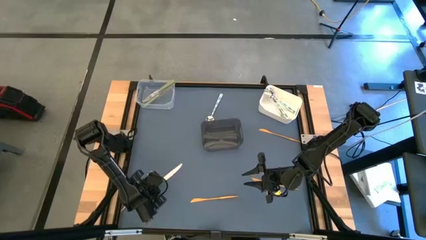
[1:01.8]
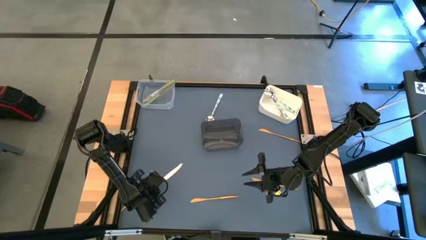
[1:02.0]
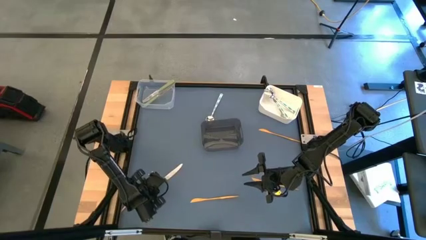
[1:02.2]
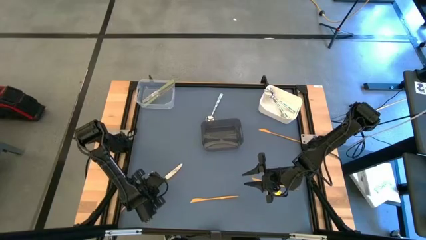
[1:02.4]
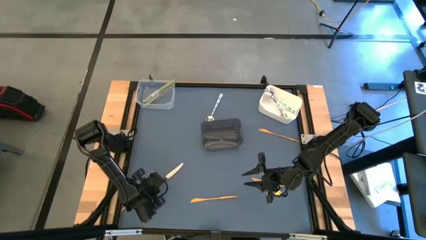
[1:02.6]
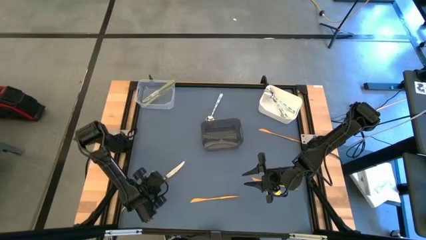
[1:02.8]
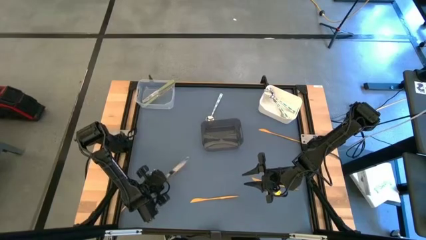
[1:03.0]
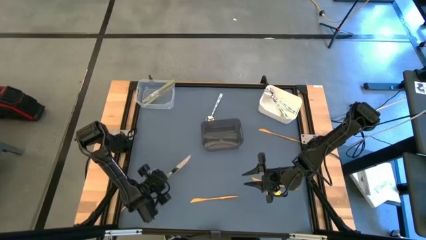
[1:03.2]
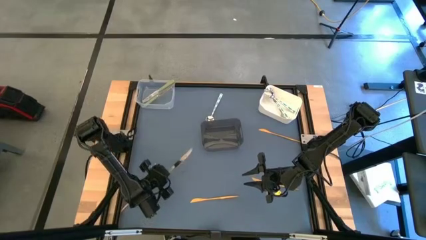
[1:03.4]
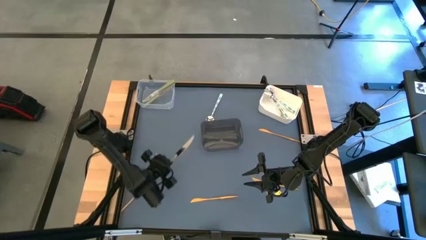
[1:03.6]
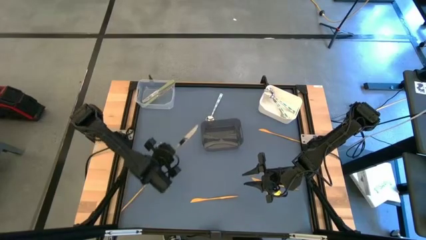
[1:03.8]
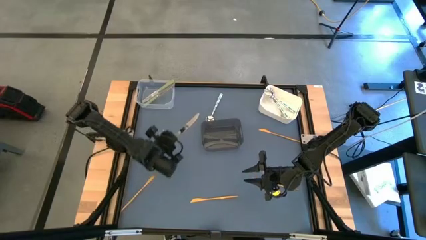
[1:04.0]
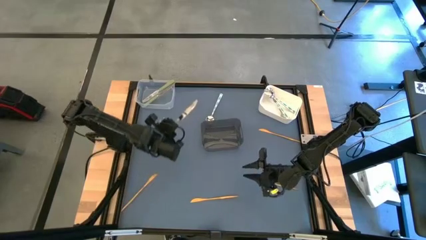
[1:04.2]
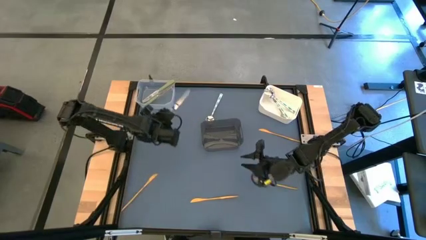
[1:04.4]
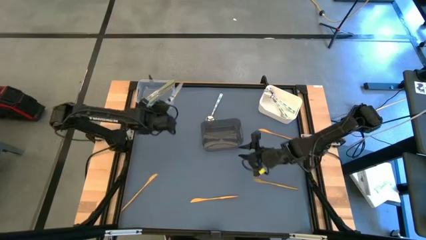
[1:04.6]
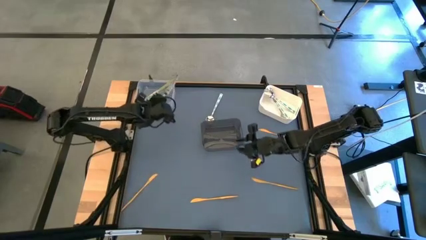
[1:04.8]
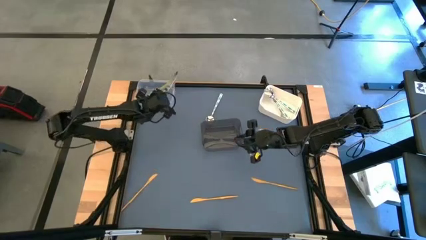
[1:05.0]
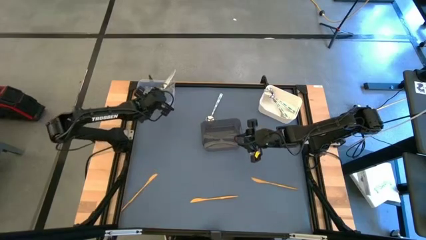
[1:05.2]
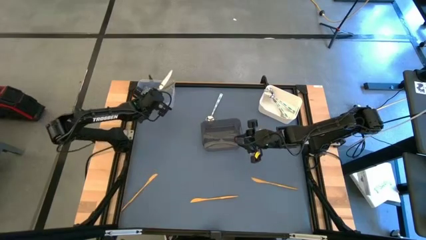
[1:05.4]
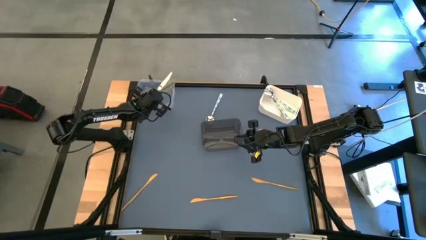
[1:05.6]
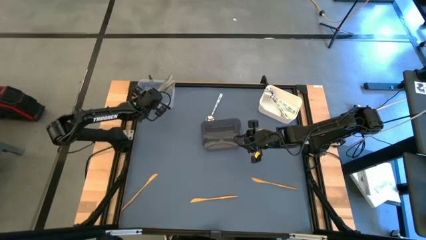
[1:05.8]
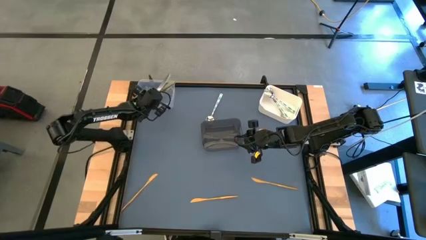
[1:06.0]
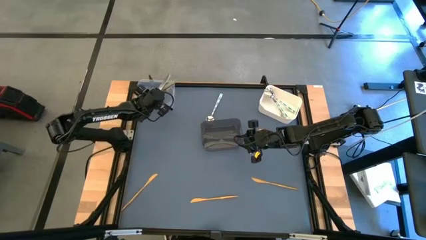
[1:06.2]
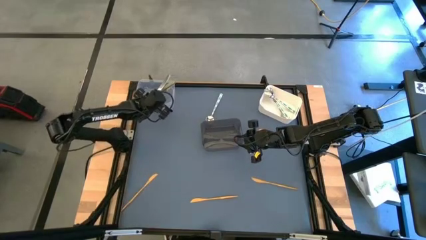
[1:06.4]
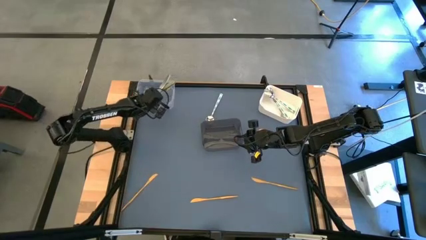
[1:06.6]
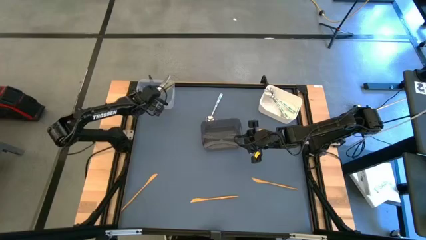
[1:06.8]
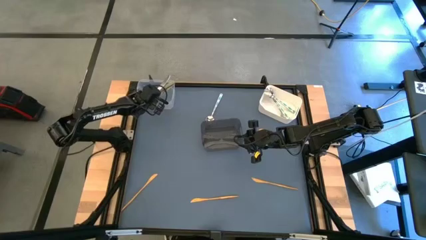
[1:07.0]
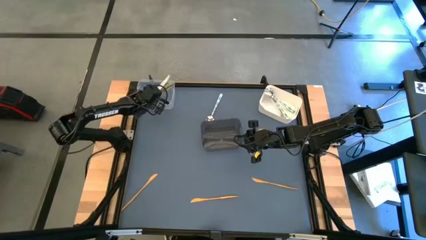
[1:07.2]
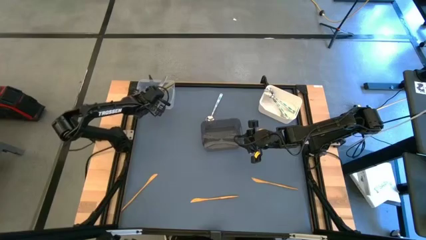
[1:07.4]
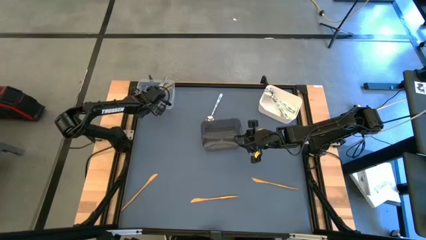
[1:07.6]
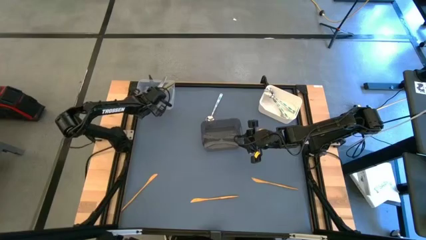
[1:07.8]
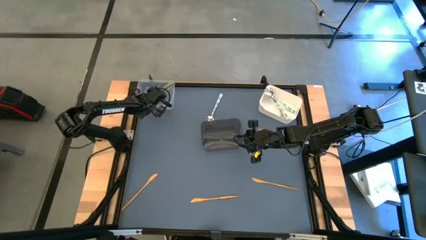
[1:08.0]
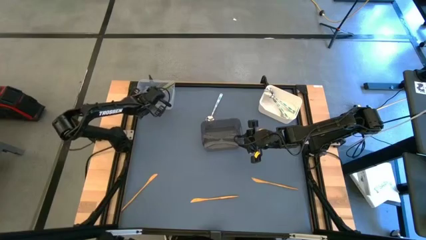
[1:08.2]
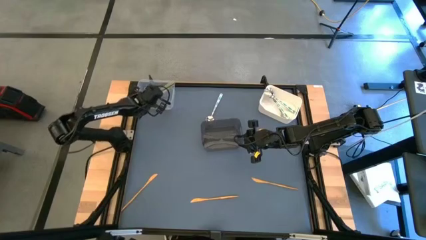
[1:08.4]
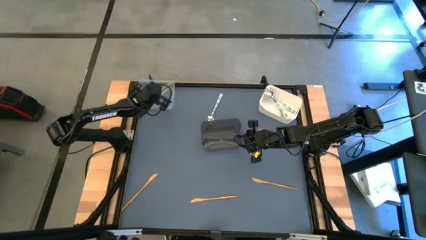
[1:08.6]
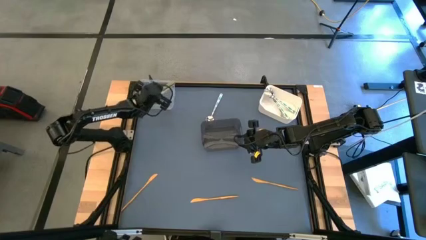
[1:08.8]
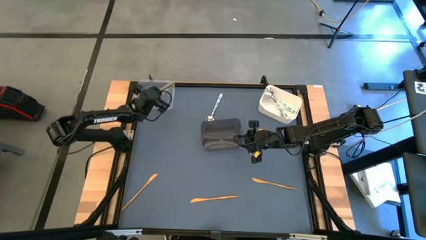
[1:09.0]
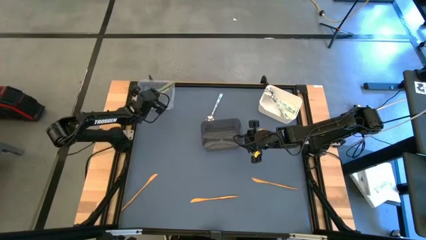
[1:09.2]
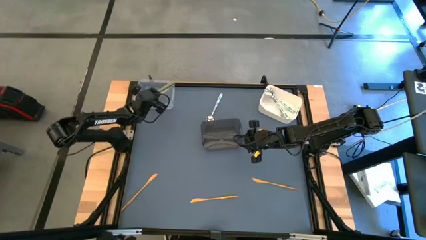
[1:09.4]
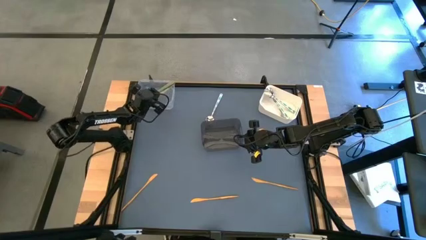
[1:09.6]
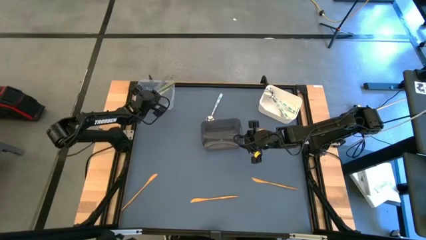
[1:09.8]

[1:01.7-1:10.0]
Task: Sort silverware by color (type)
Put the green knife into the transparent bin

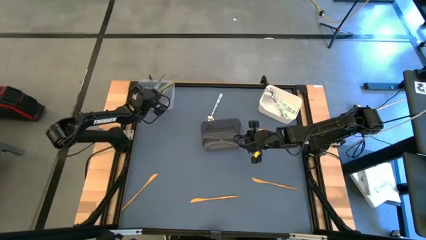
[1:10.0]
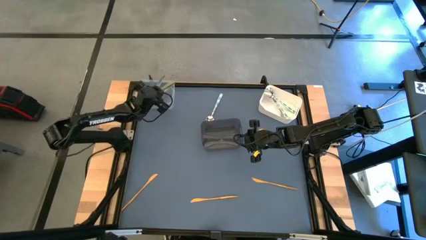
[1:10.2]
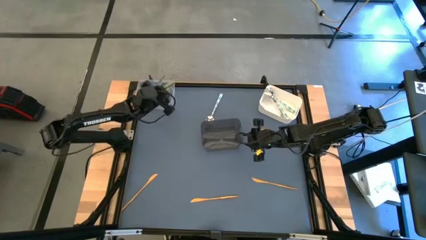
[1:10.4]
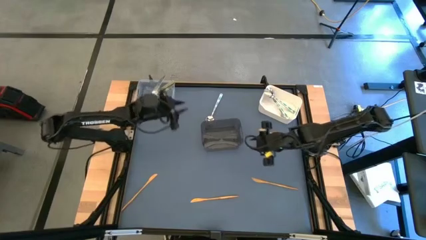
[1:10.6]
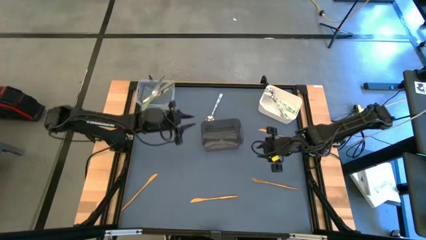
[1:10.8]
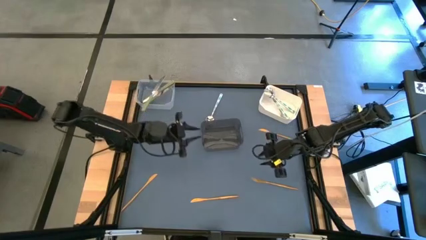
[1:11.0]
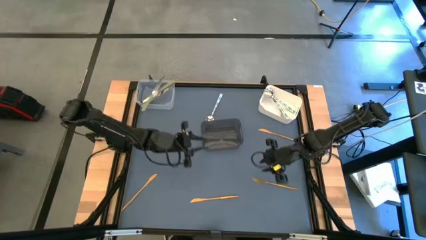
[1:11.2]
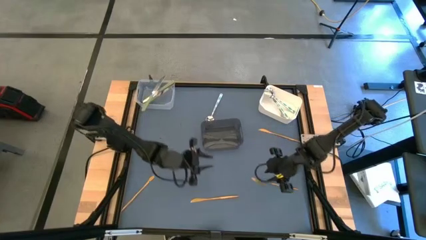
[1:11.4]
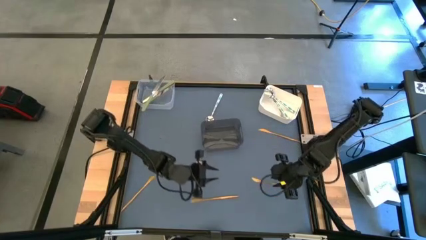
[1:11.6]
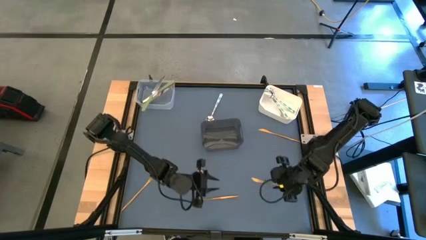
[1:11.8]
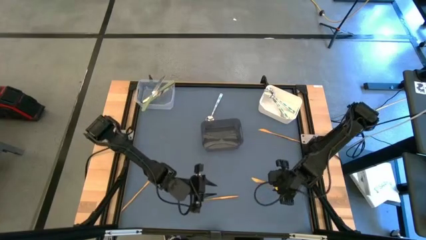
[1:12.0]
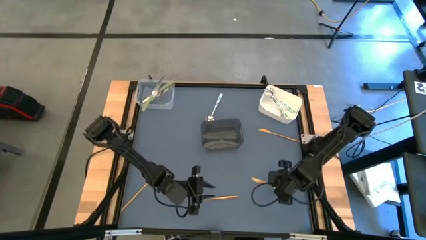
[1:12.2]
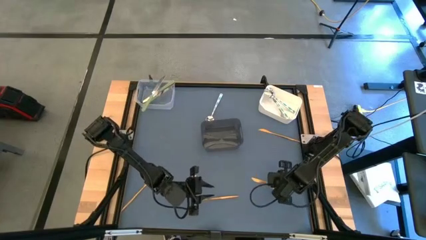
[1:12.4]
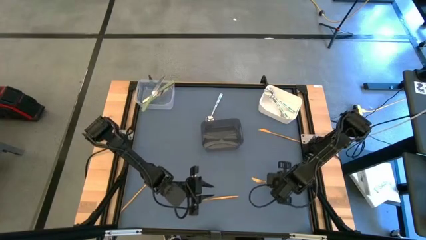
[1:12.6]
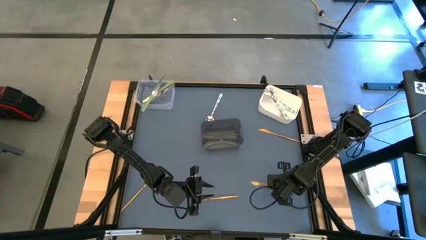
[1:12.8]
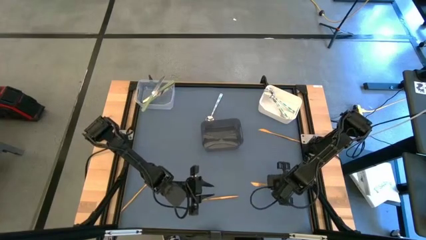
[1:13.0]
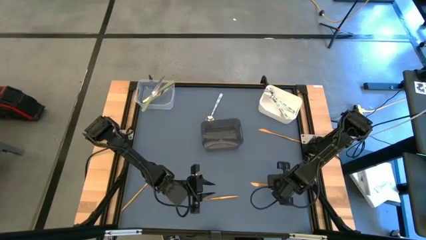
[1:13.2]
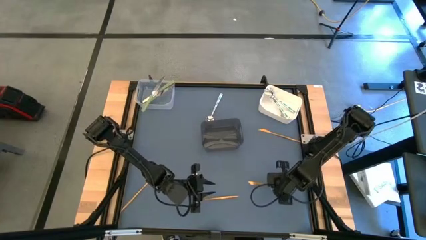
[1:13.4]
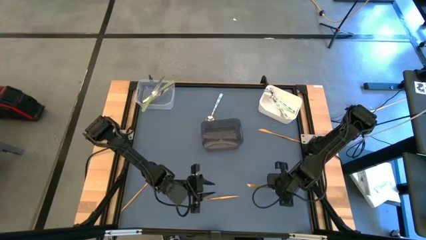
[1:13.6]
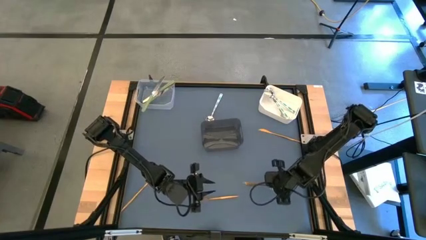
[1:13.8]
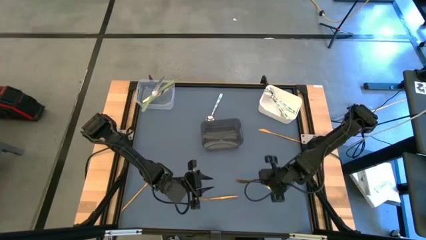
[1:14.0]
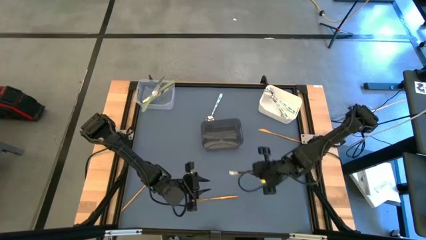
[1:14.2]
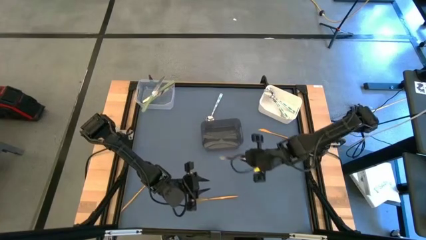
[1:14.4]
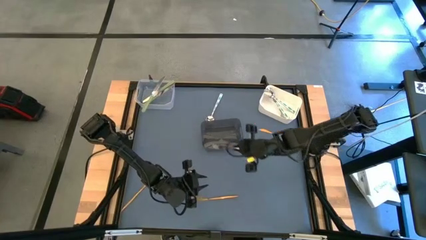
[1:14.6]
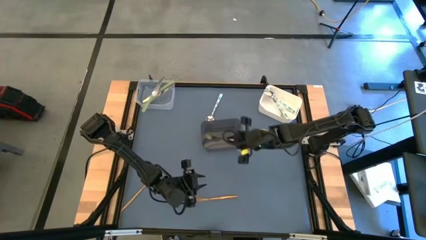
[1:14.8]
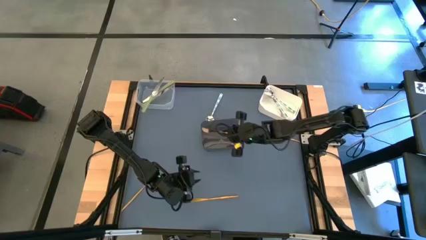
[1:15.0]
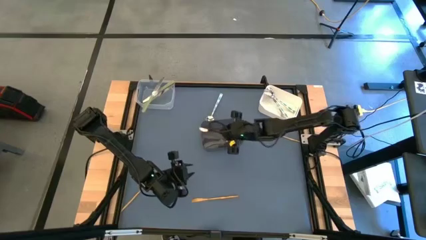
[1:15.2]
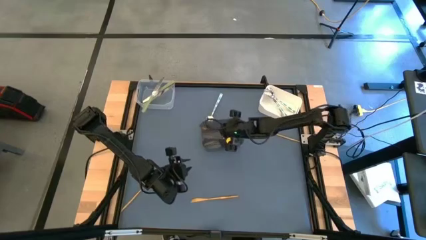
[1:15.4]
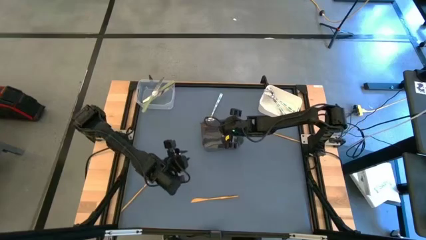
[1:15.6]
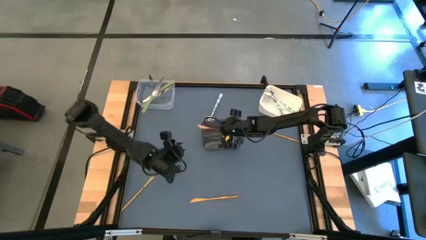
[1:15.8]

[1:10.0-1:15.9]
Put the gold knife into the black bin

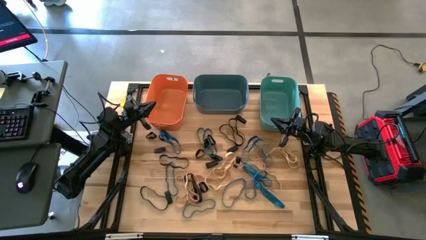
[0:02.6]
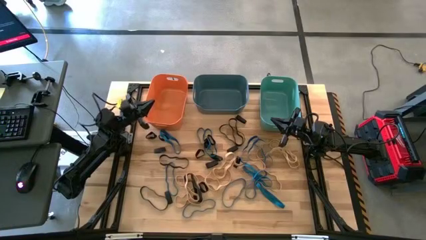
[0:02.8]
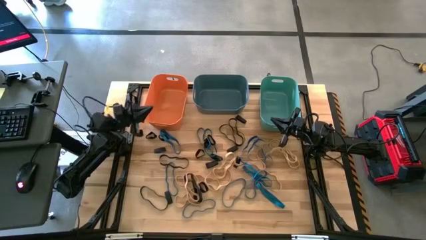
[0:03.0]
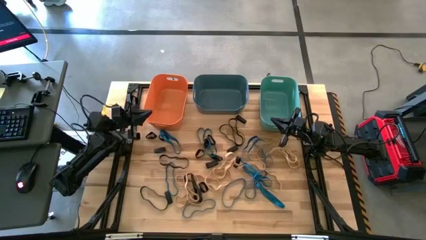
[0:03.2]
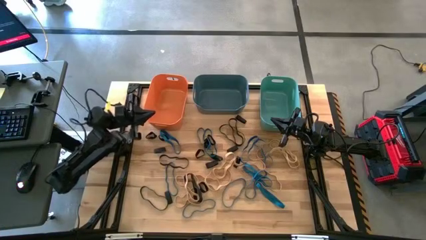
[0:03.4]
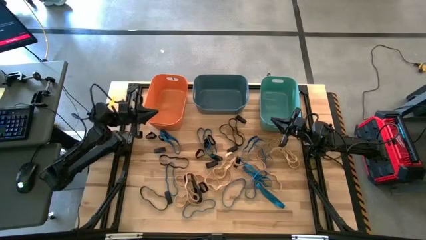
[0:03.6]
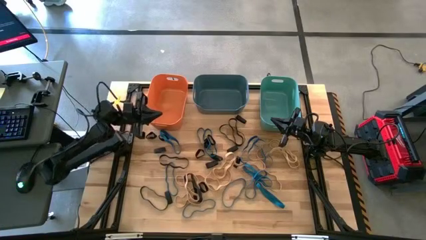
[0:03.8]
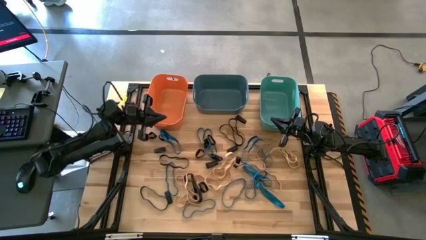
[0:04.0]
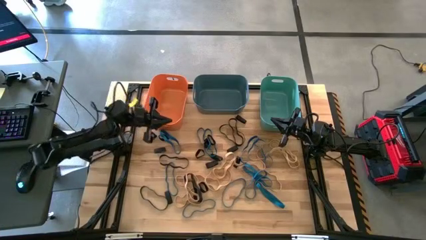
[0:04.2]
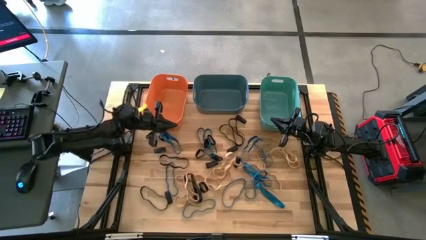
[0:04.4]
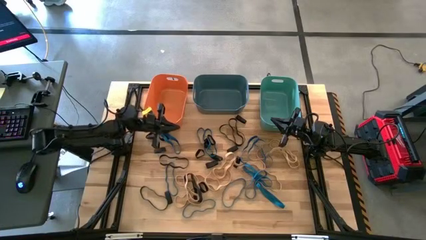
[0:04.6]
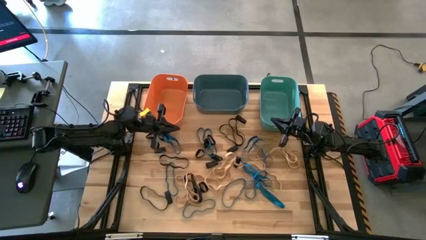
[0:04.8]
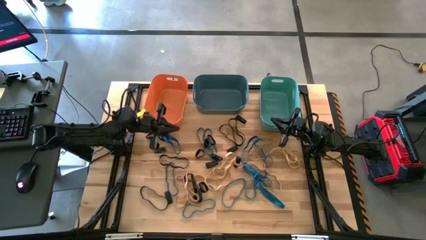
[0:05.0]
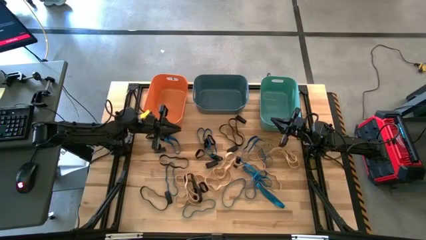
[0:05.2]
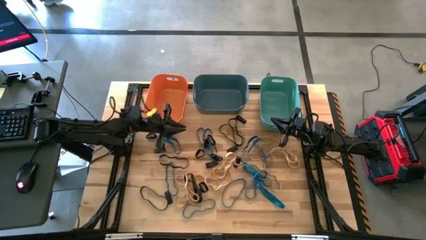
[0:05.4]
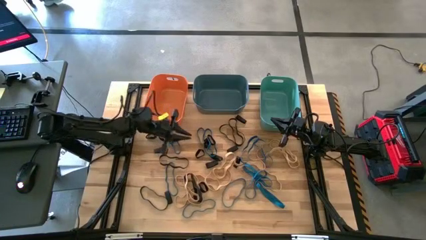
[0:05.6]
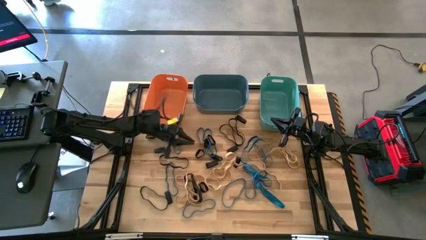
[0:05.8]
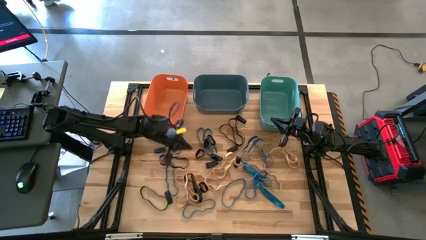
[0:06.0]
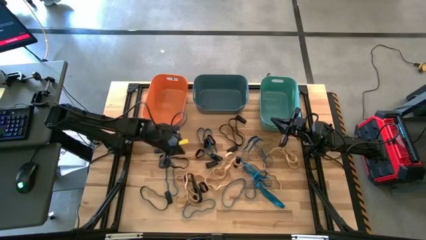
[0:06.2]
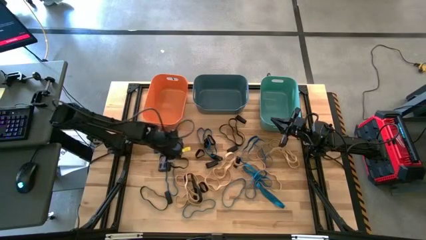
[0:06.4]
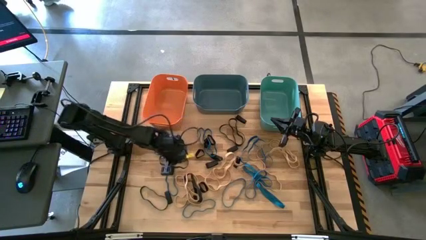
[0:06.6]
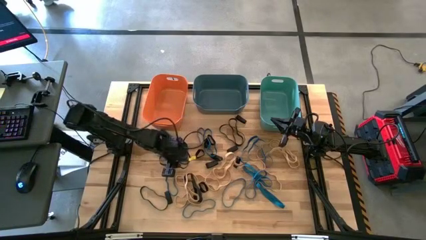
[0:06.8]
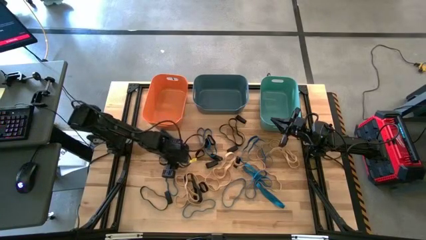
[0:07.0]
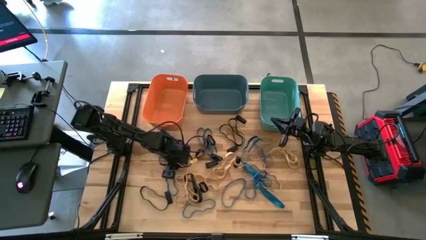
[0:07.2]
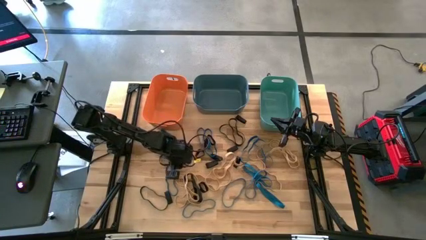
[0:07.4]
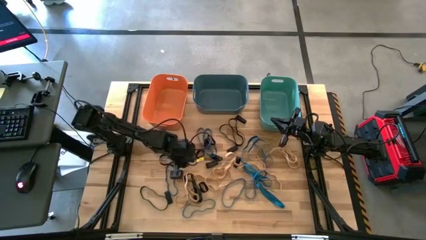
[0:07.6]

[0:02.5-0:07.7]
Task: Sort rubber bands into baskets
Put the black rubber band into the blue bin
